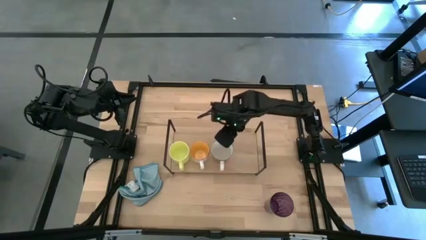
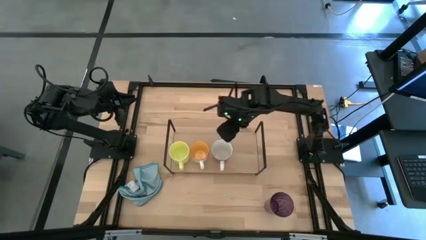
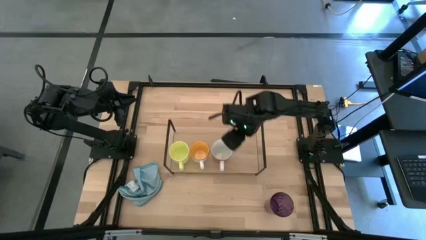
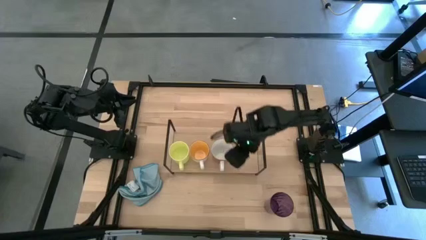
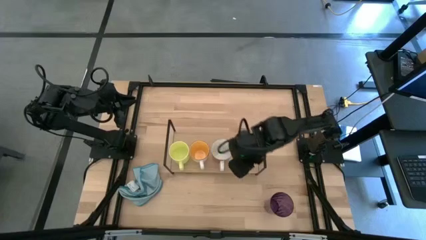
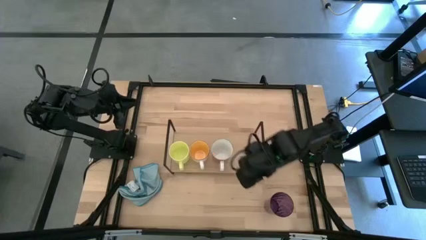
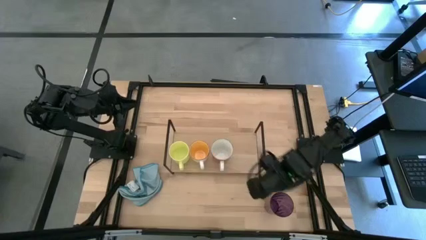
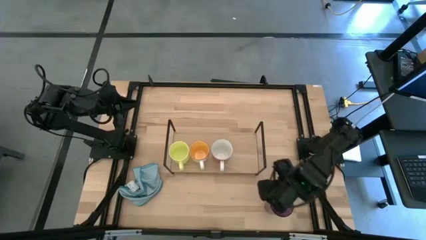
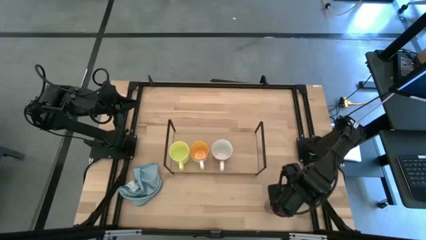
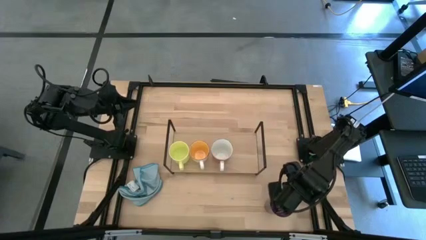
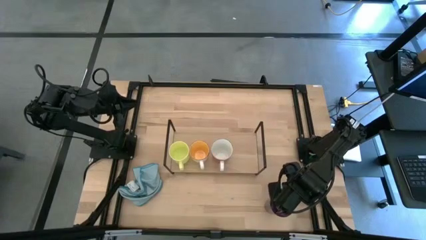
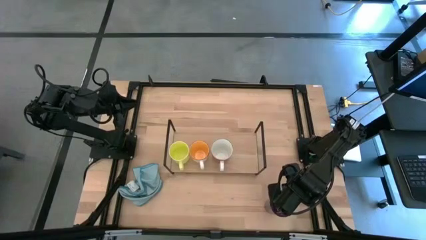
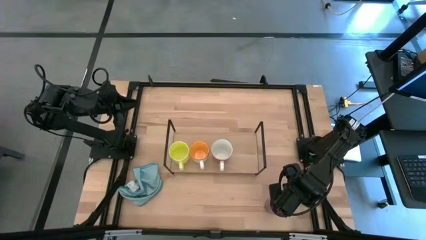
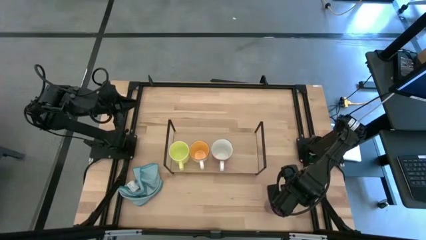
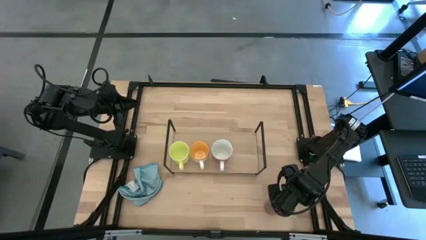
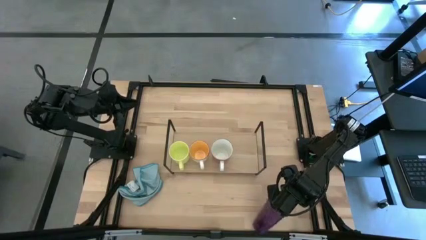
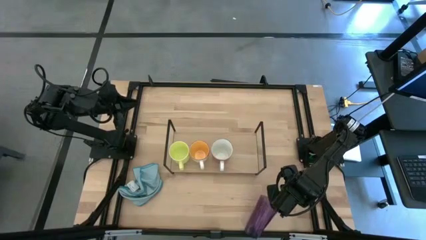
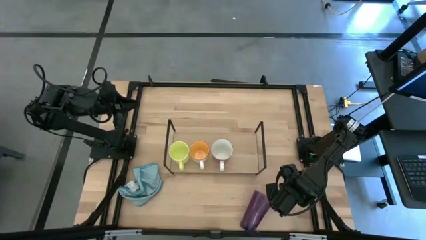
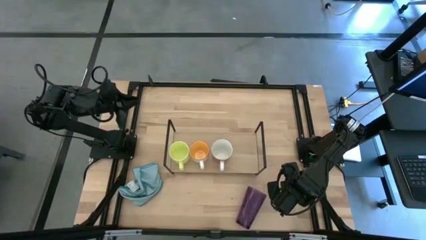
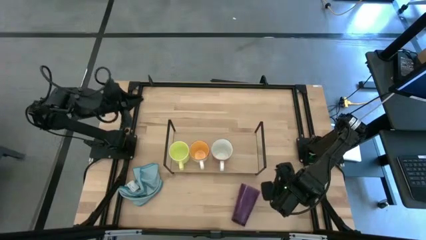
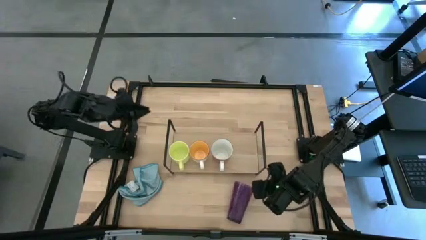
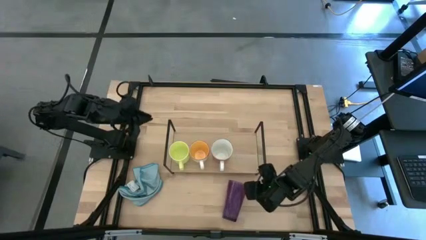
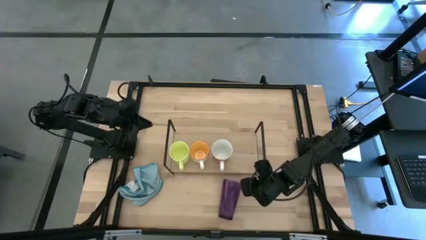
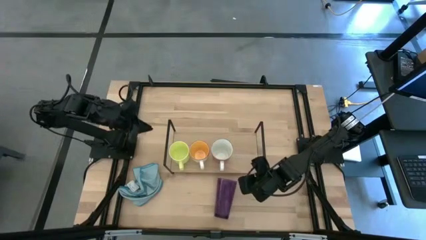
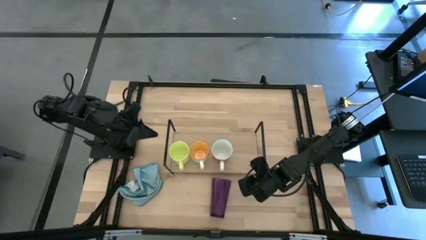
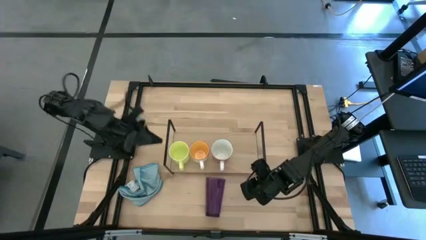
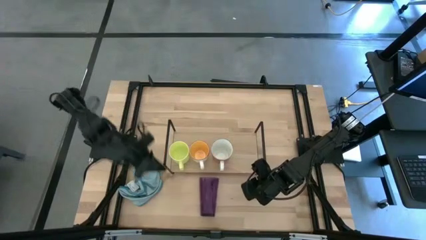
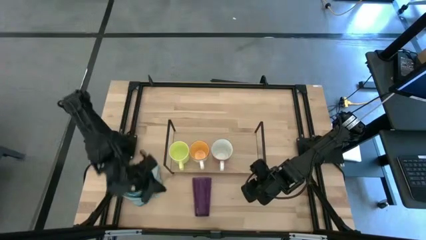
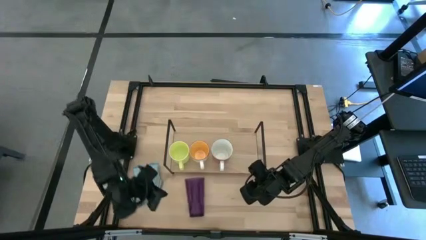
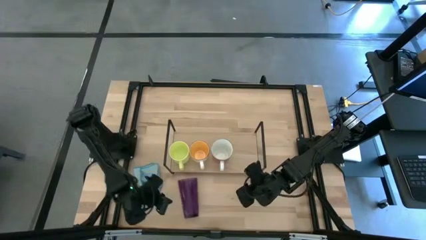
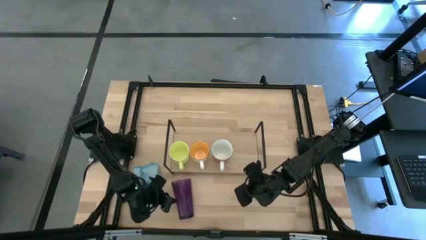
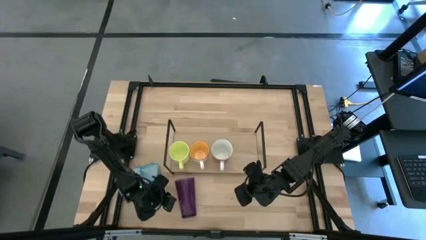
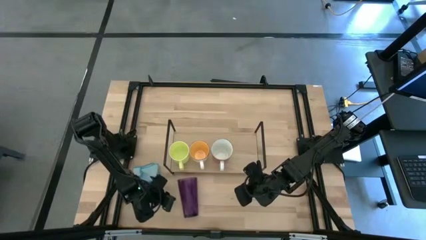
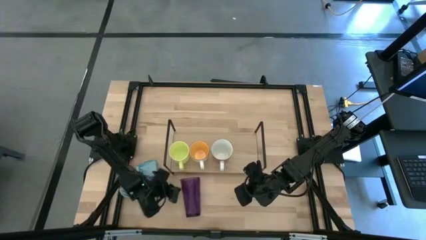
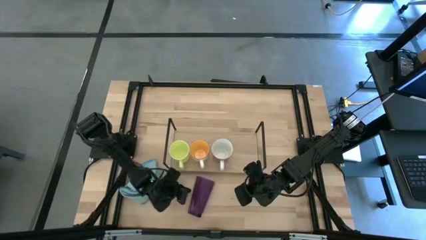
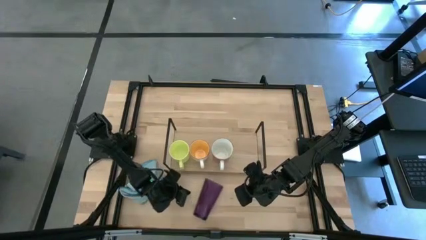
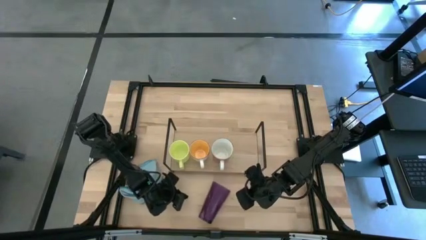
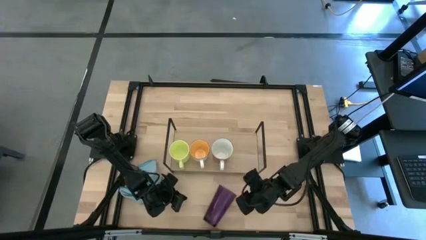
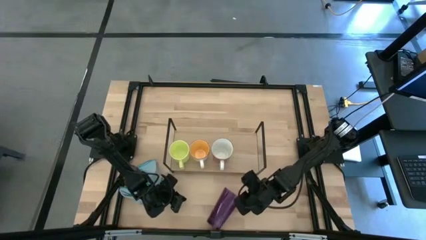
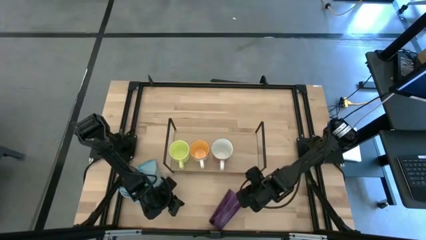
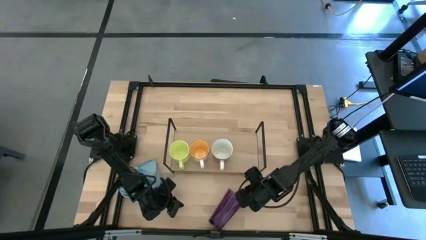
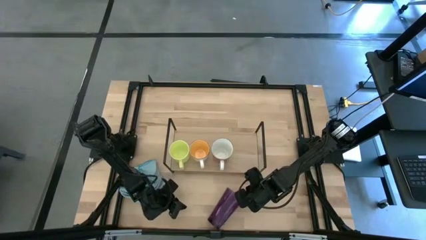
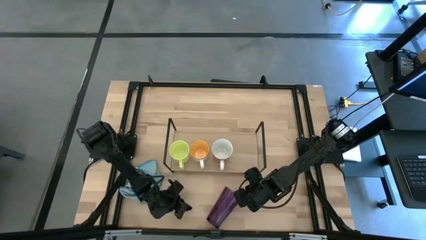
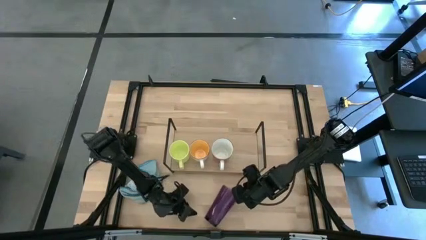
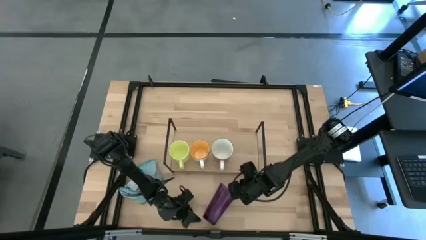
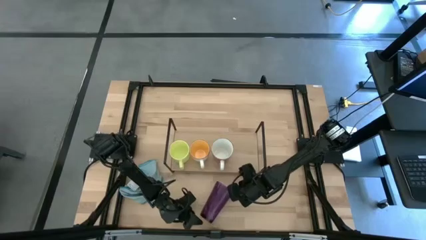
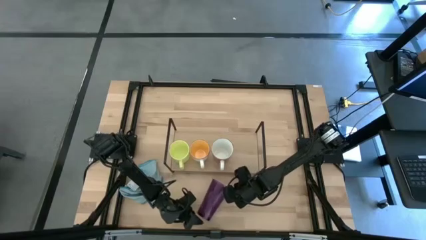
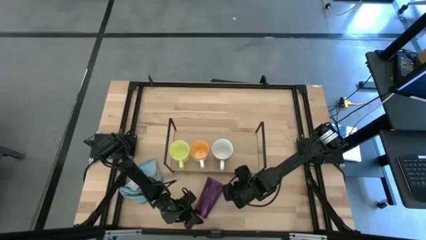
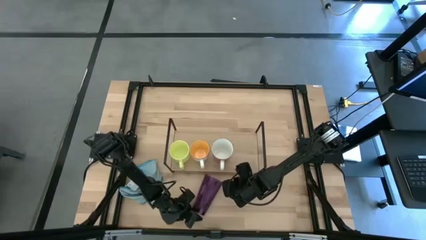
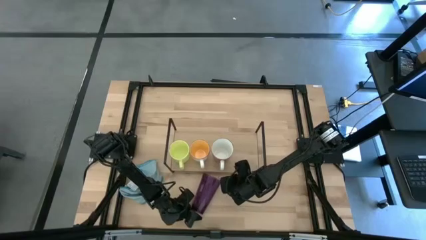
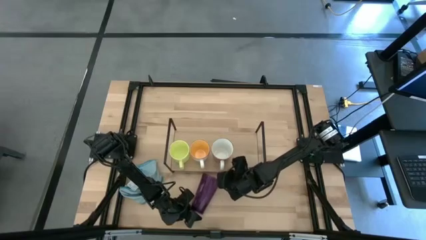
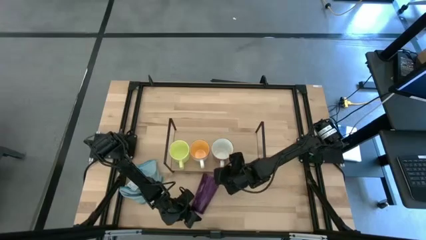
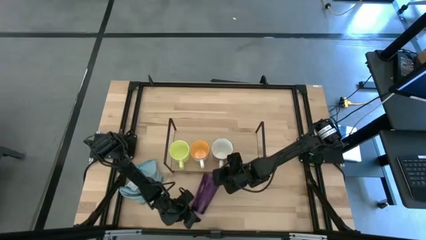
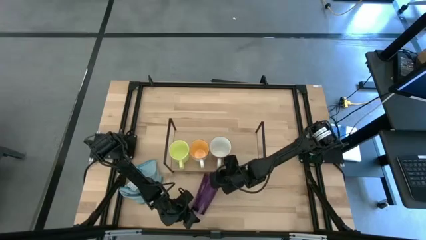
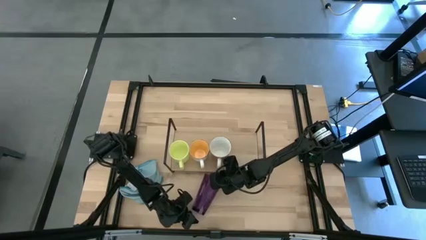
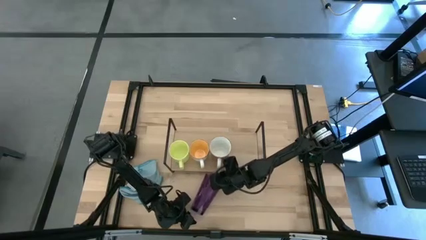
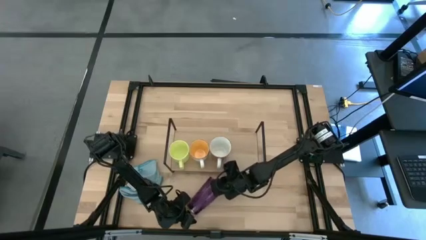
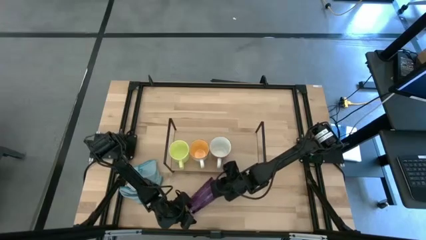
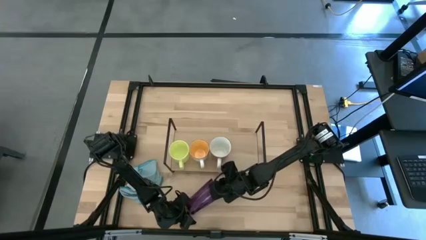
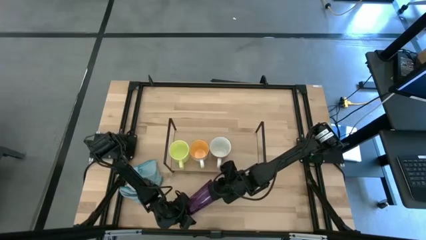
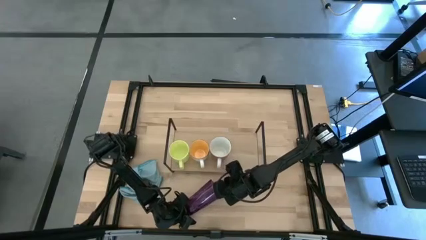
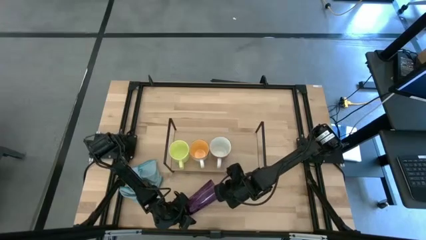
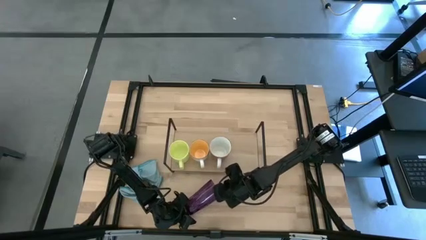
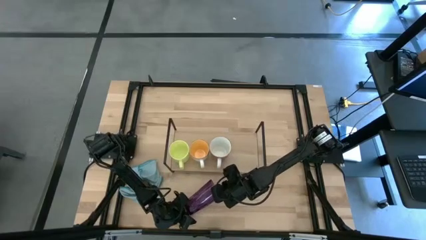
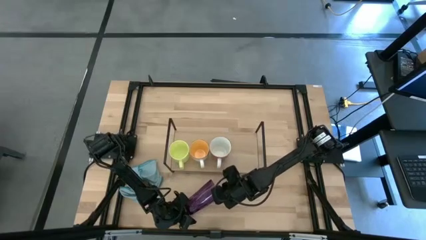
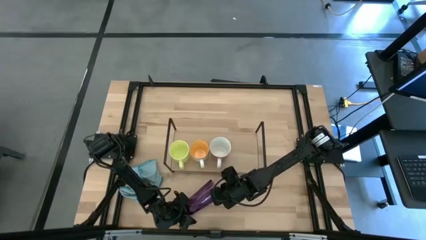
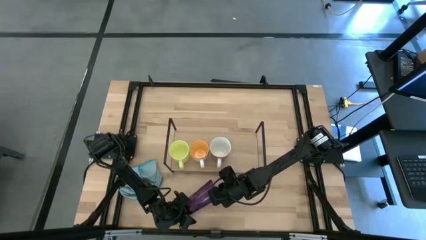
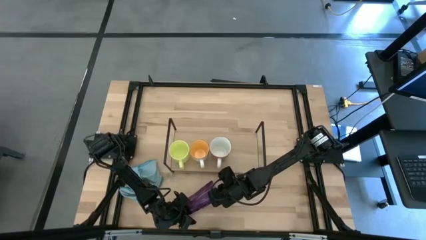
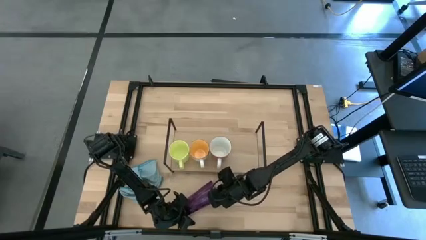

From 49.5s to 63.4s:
Task: Stack small to large cups/mugs on shelf
Put the violet cup on the shelf

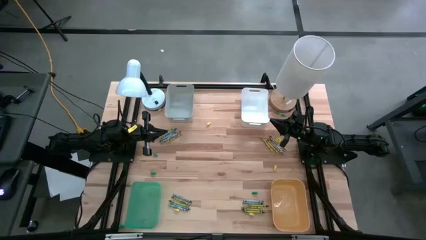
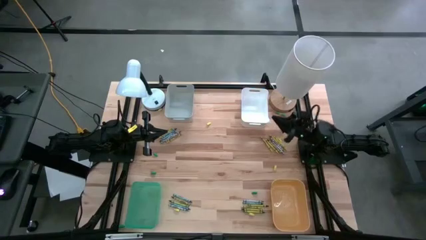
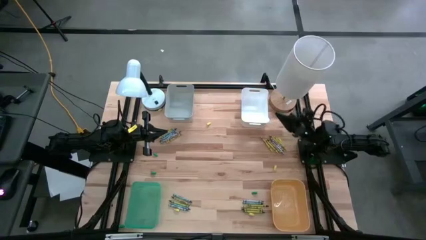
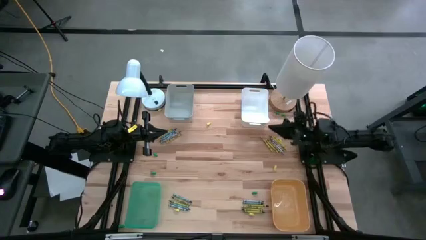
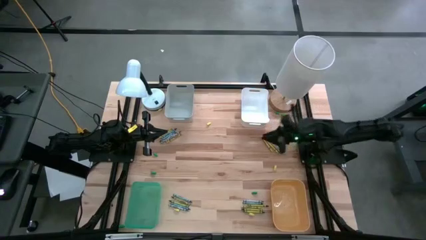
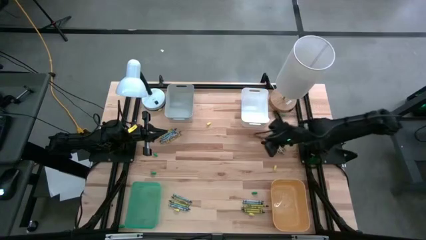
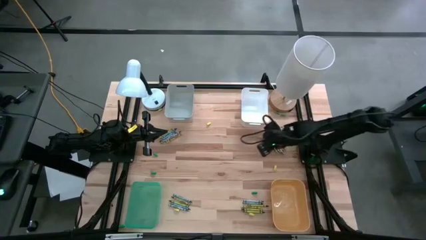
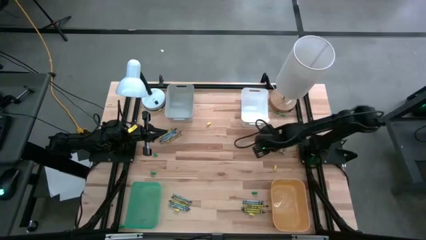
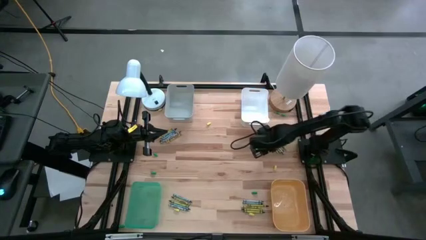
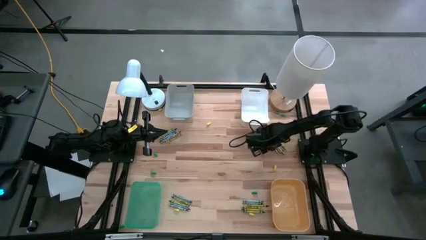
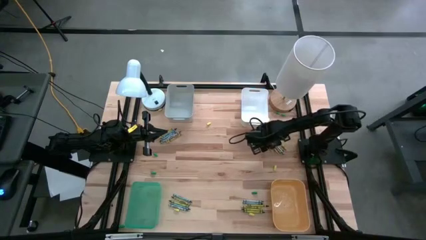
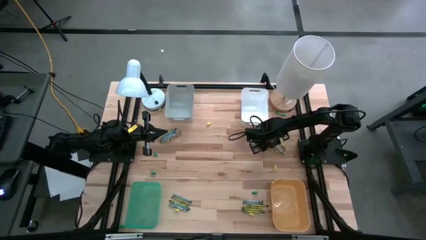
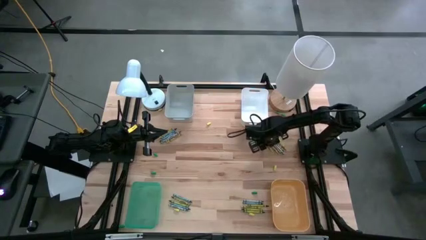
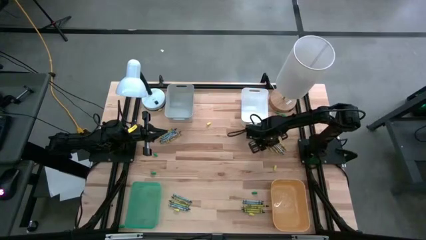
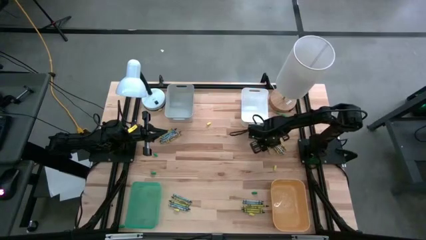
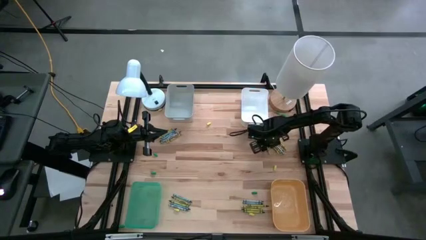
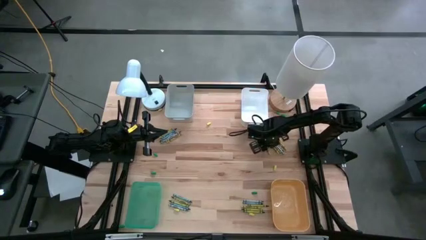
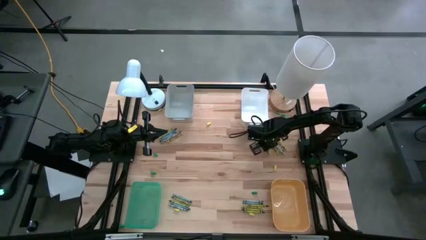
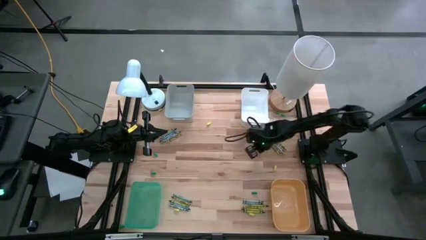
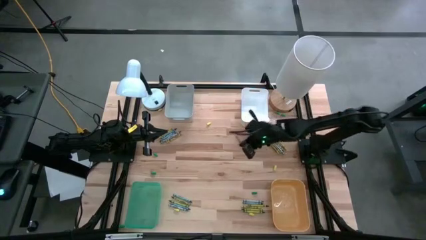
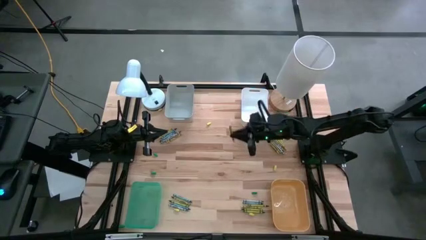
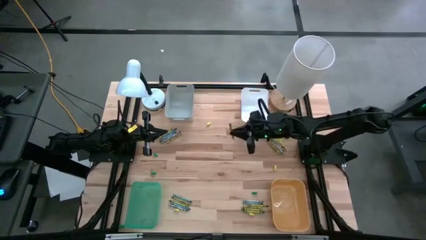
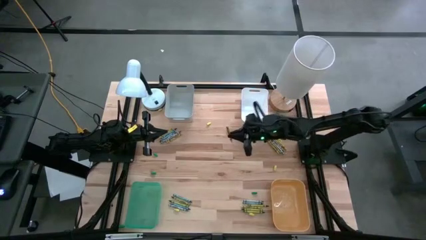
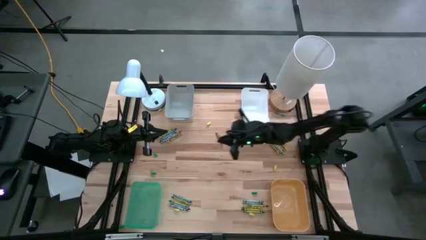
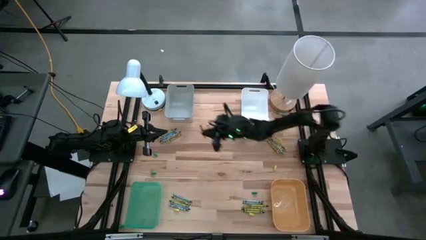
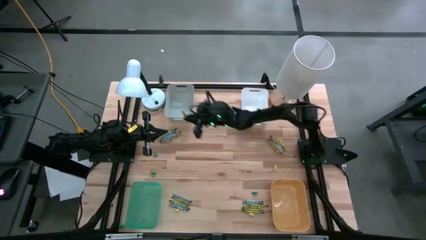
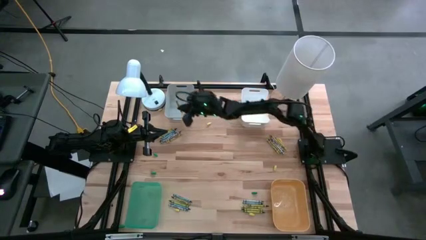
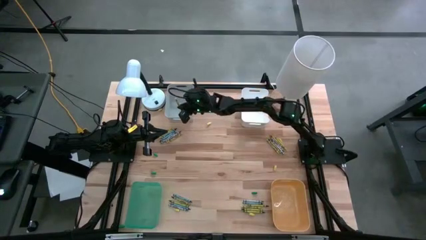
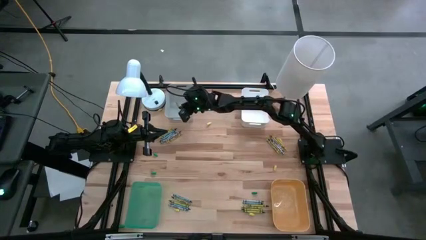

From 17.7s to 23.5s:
Task: Sort crayons
Put the yellow crayon into the gray bin
